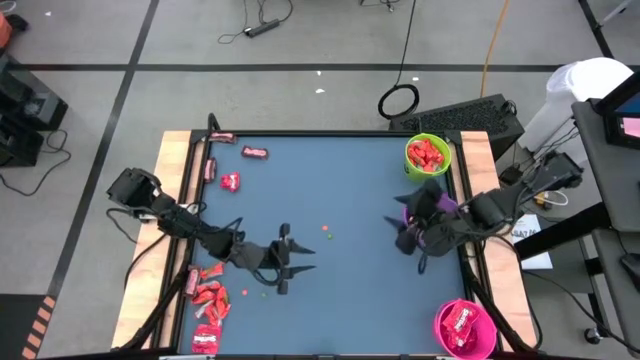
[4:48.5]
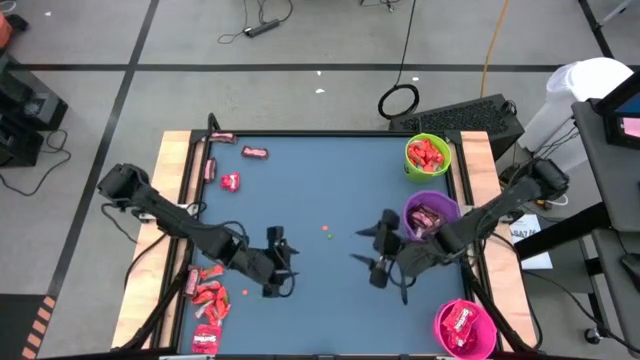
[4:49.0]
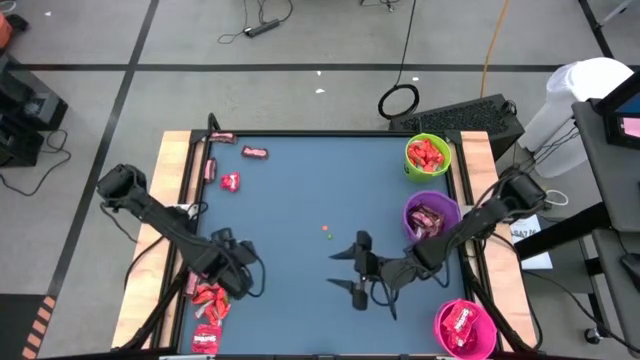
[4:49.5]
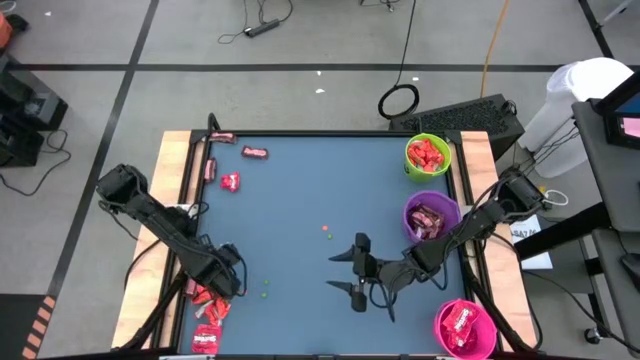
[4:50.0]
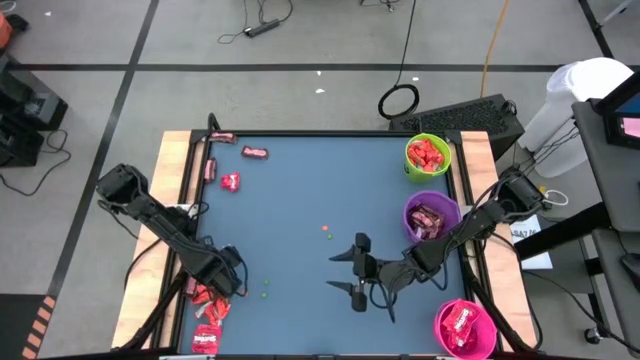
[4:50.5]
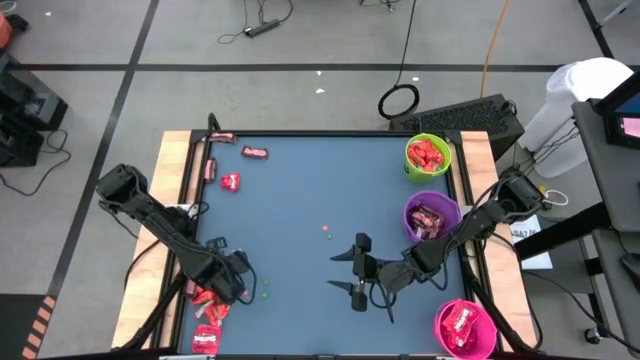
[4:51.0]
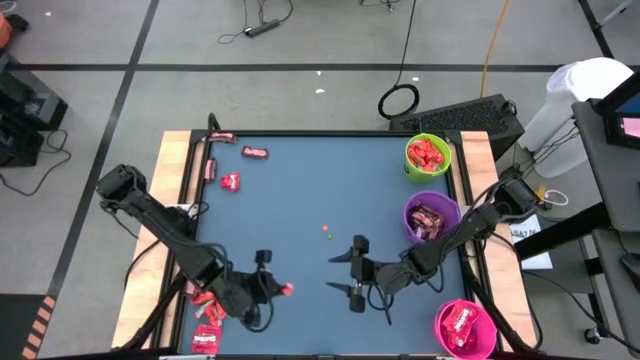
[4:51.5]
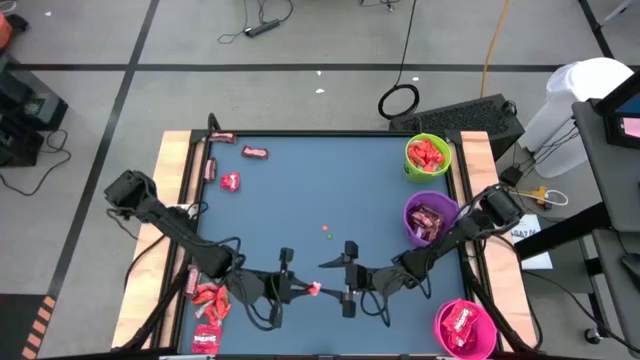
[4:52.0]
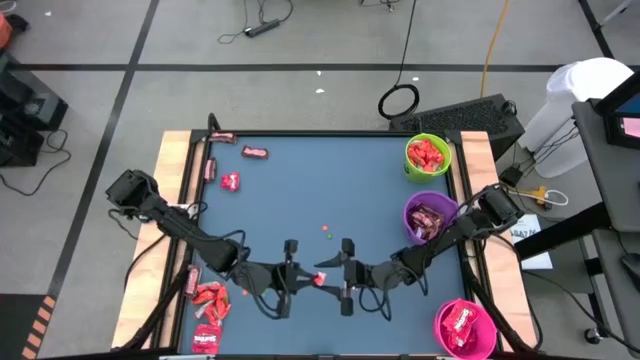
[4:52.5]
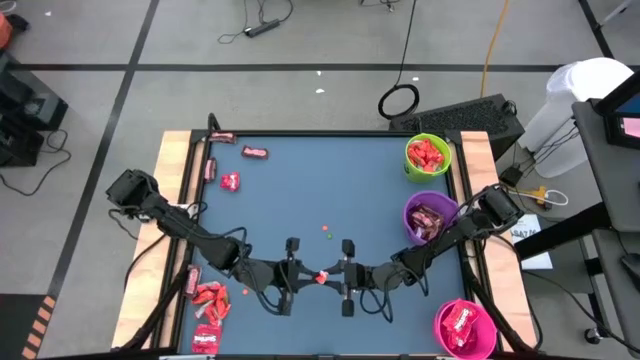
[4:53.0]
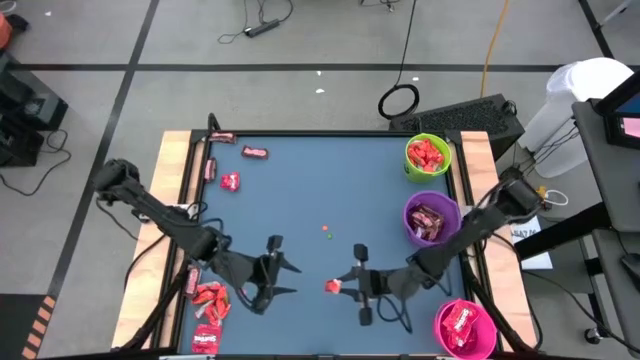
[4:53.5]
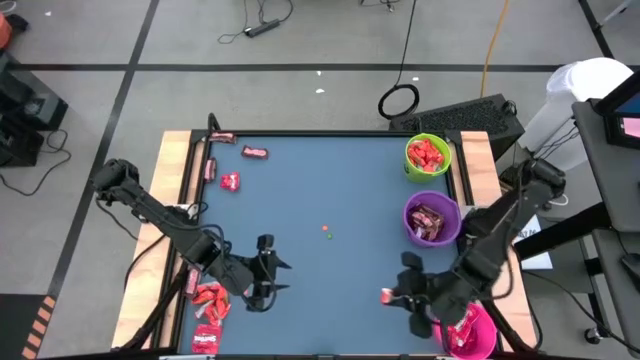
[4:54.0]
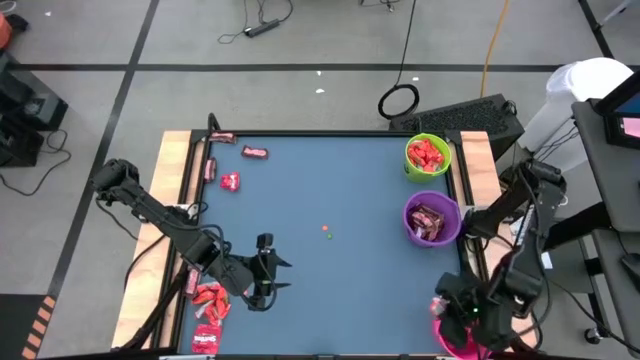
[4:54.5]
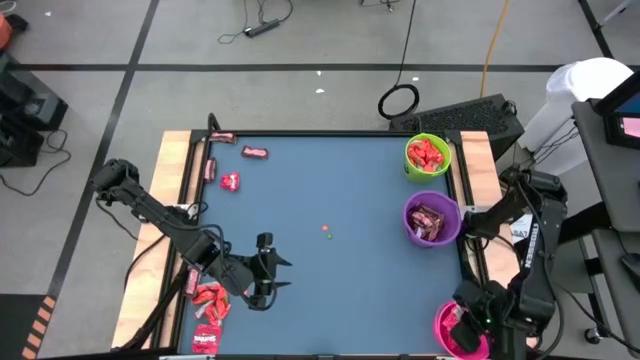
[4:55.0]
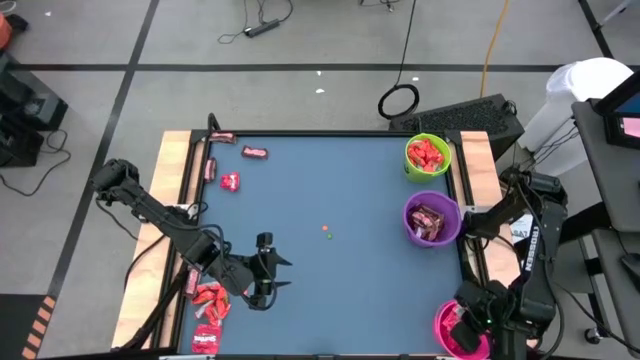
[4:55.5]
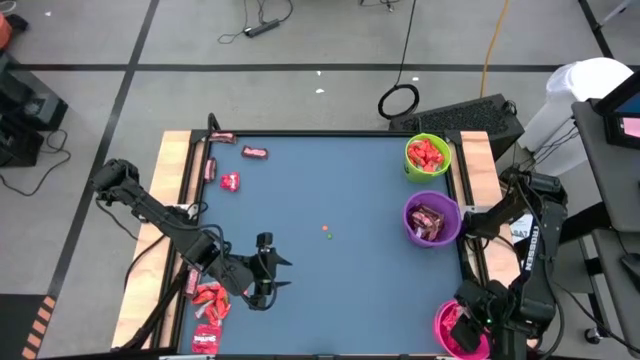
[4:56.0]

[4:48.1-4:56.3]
Task: Organize candy in baskets
Put the orange chocolate bar into the pink bucket

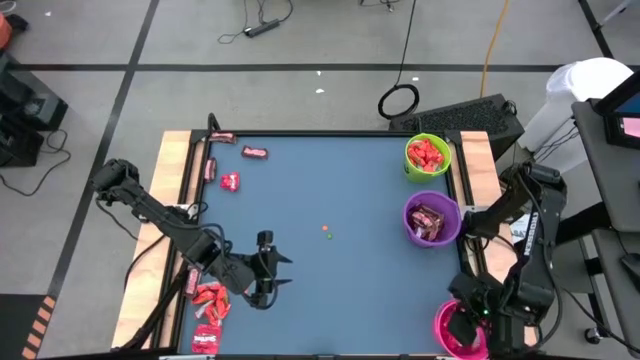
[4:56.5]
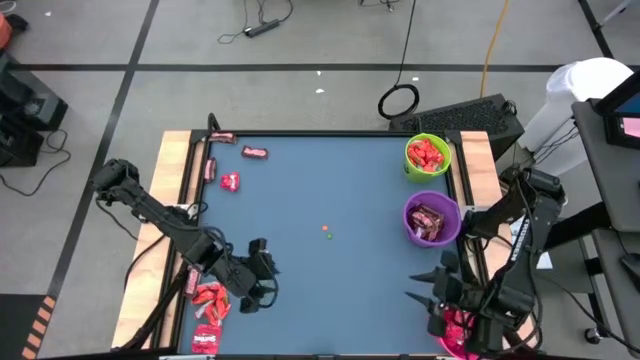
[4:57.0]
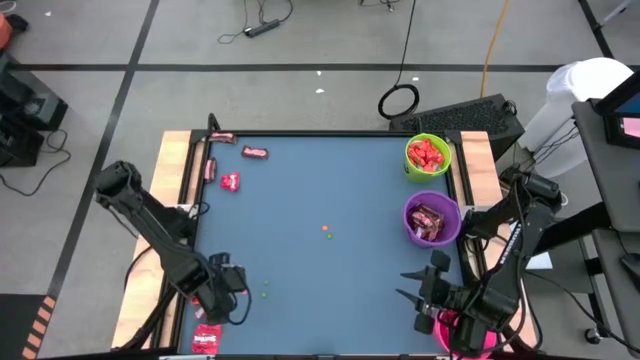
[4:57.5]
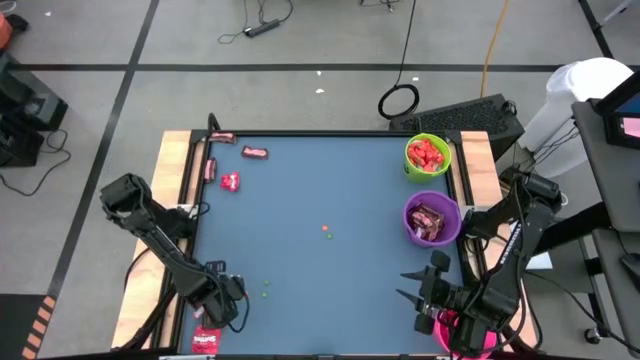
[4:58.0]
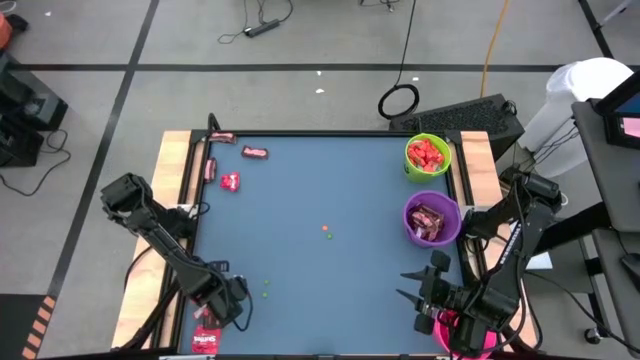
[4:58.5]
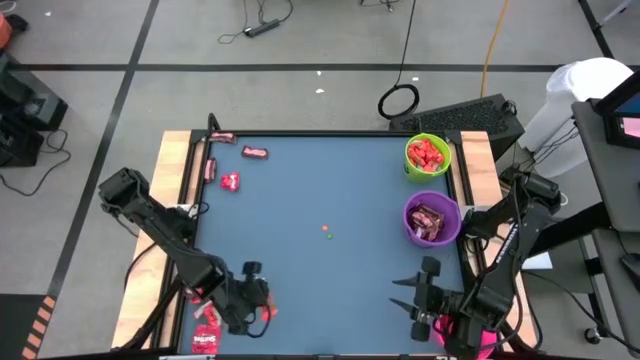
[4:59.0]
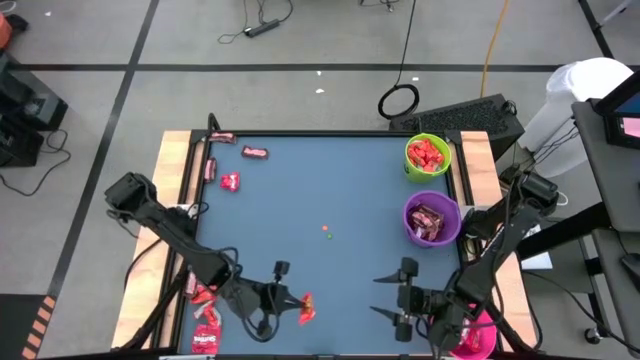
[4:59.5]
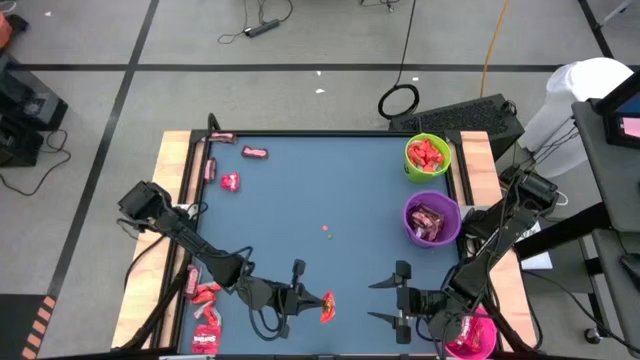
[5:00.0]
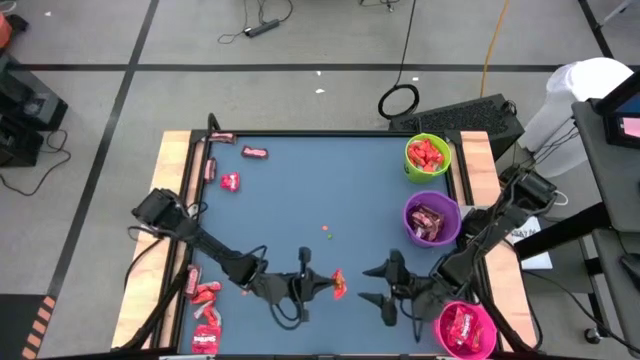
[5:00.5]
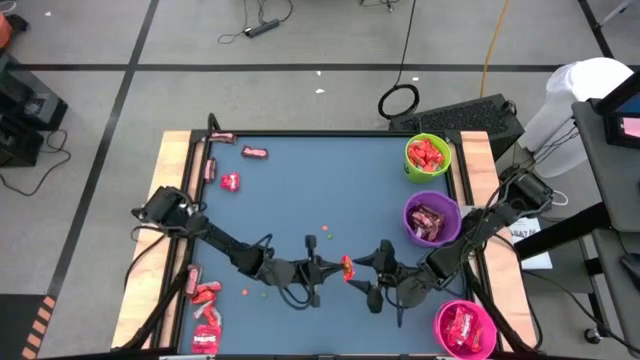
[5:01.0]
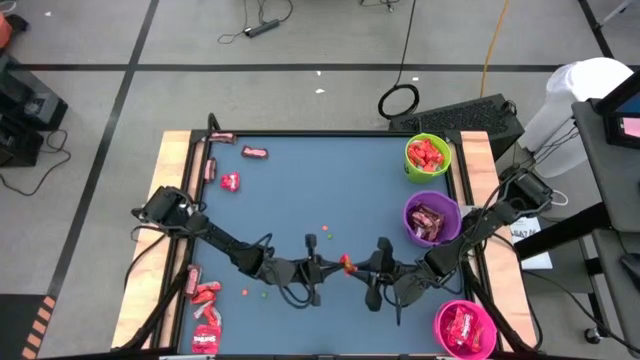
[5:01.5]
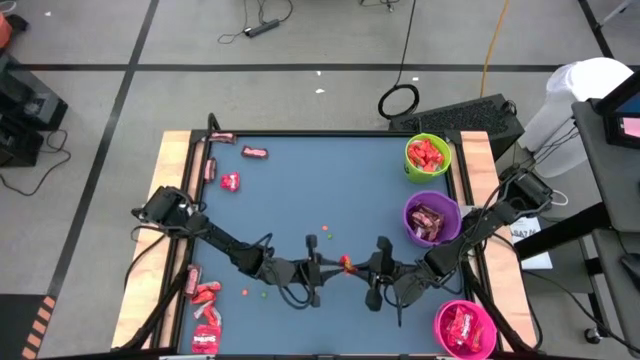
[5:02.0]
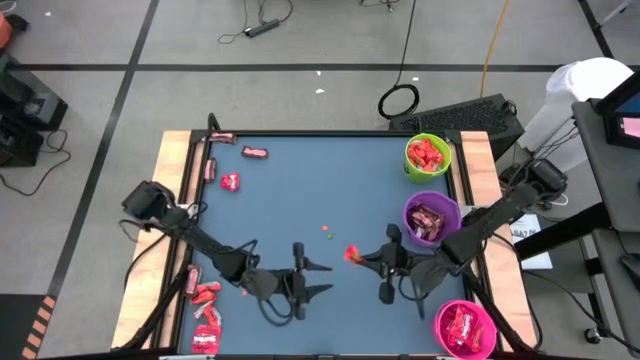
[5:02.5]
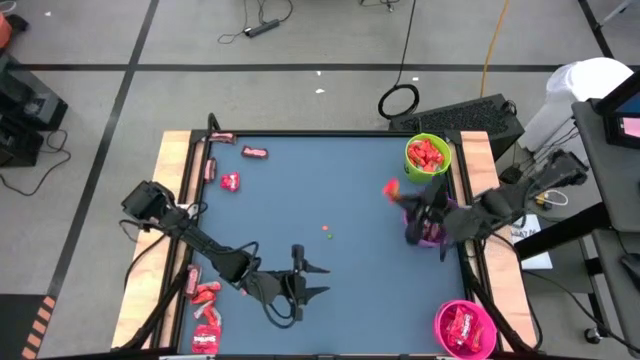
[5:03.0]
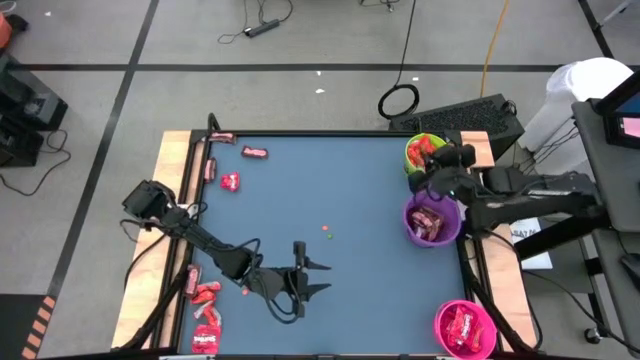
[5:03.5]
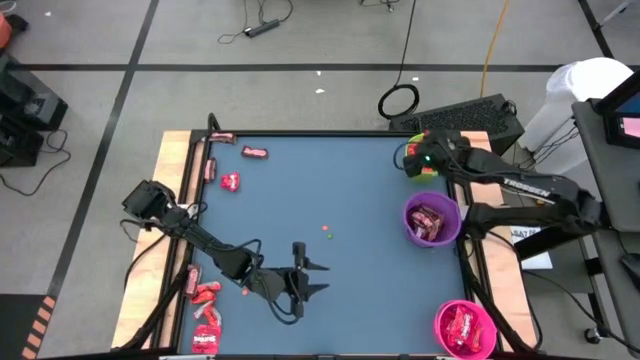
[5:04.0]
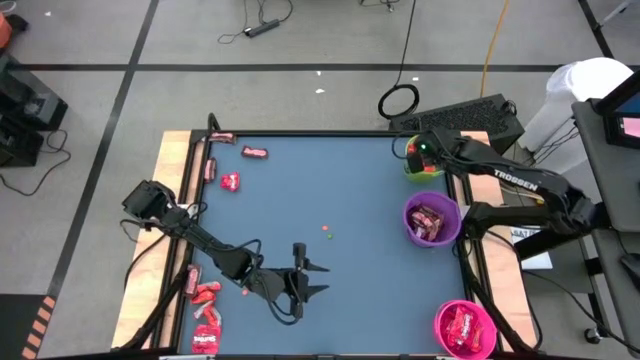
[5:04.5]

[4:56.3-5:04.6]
Put the orange chocolate bar into the green bucket

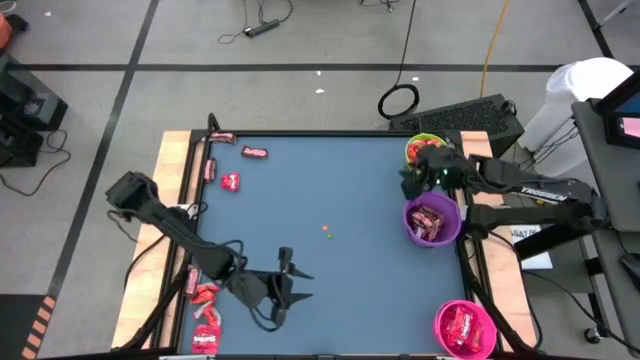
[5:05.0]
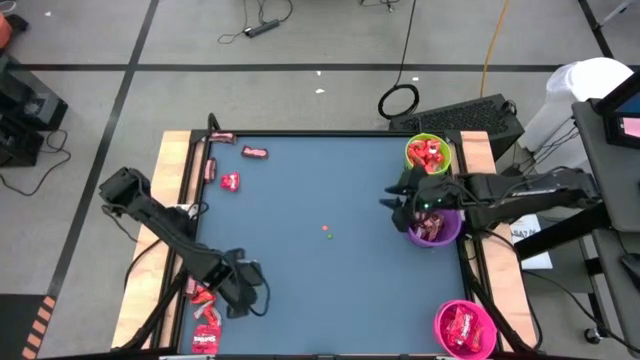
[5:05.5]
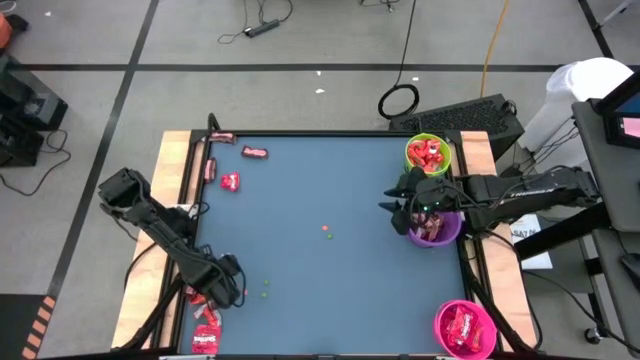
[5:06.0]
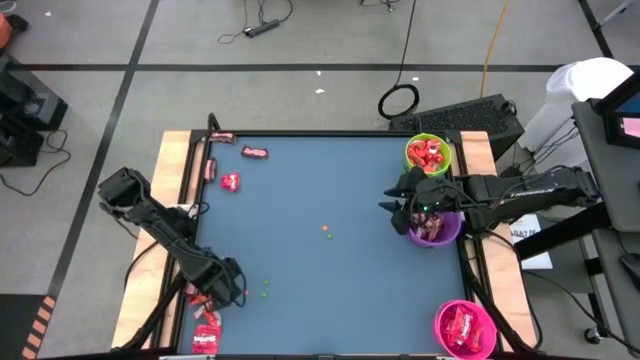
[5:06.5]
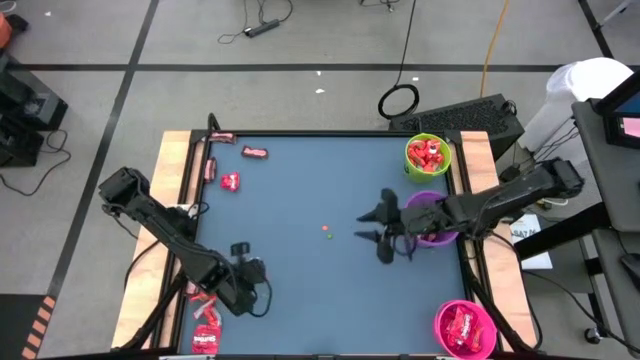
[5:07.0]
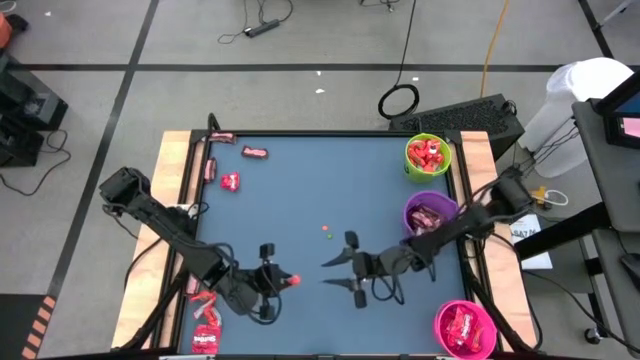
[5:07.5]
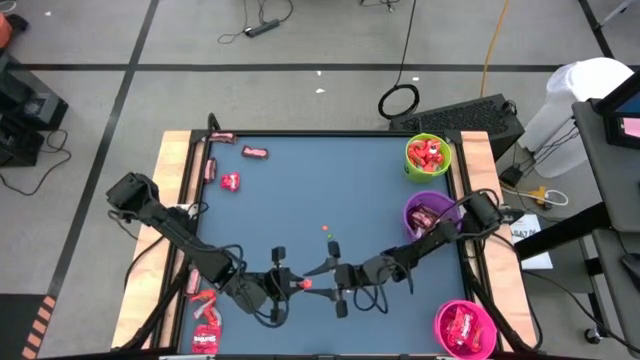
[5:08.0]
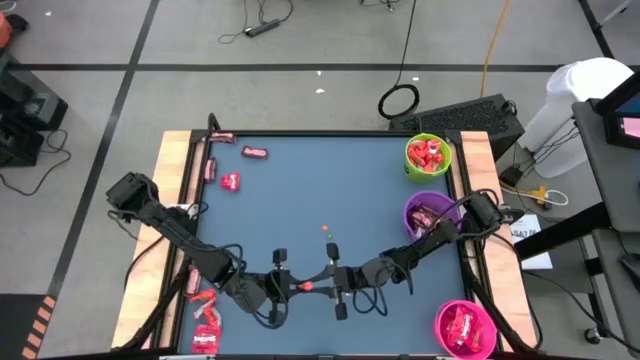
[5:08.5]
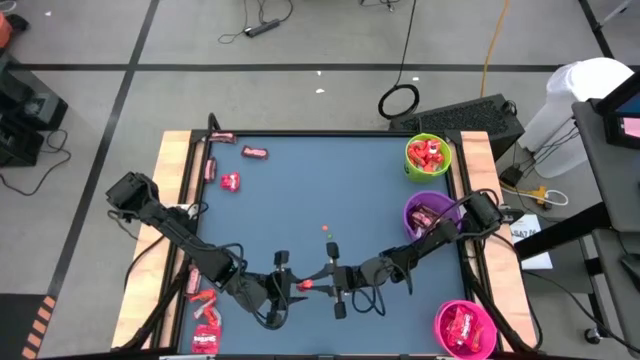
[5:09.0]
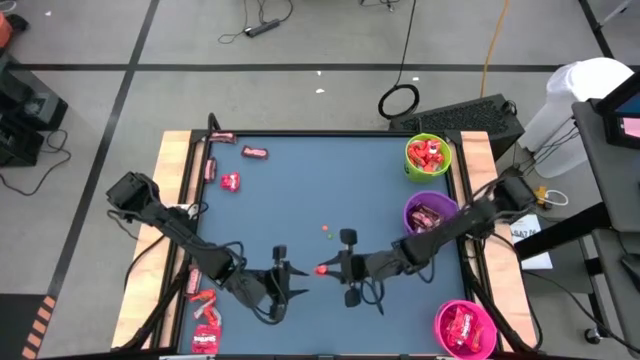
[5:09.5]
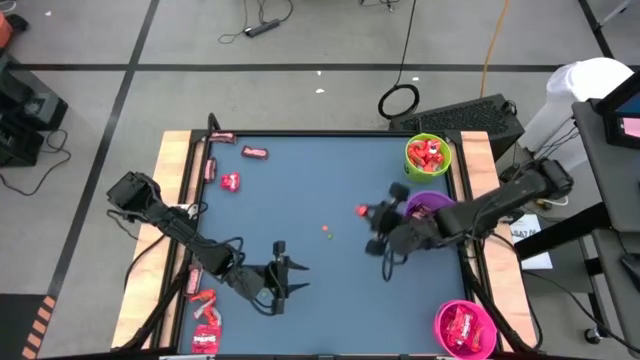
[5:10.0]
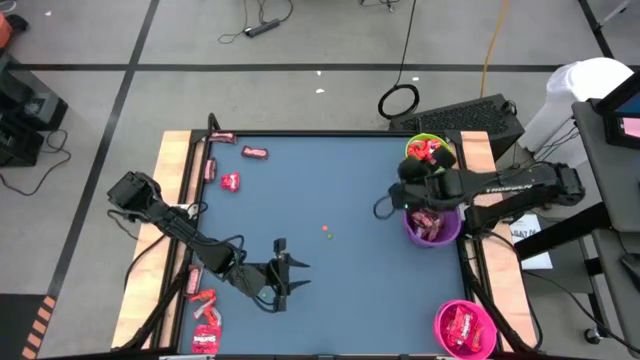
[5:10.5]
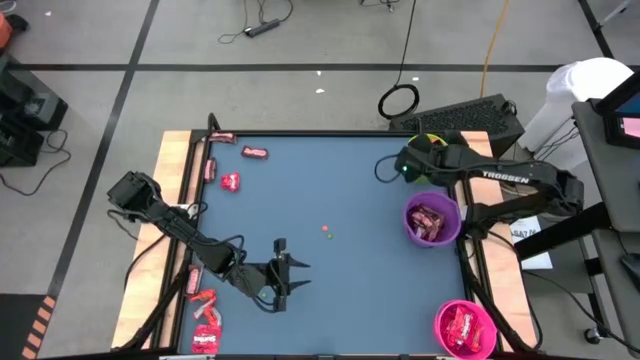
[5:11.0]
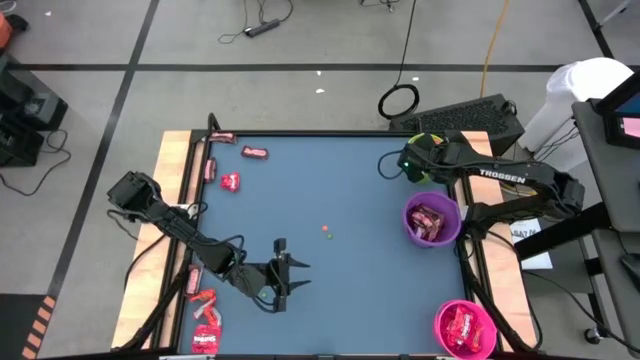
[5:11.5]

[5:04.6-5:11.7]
Put the orange chocolate bar into the green bucket
